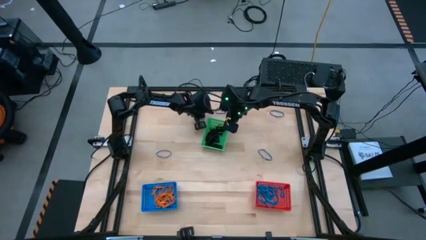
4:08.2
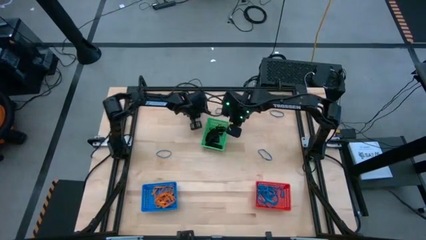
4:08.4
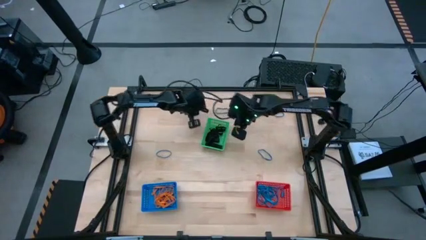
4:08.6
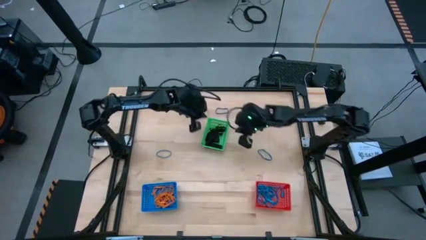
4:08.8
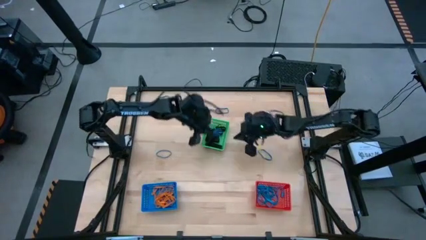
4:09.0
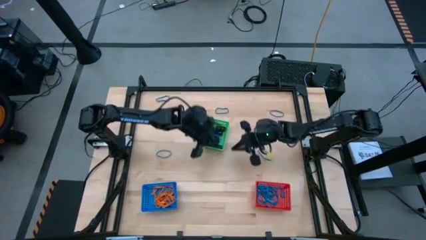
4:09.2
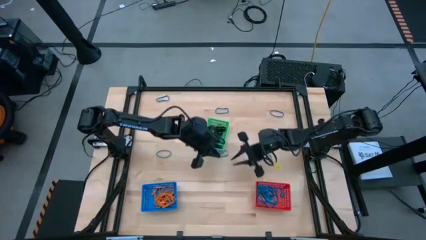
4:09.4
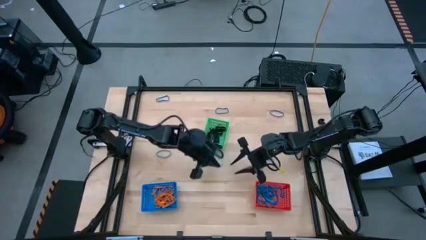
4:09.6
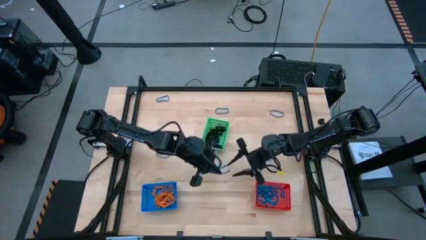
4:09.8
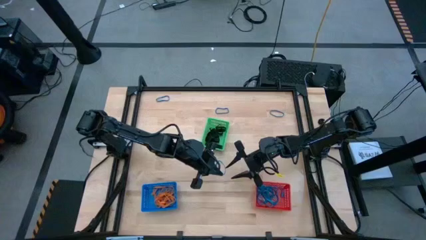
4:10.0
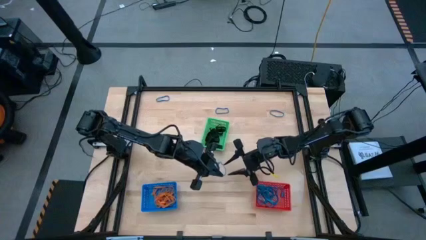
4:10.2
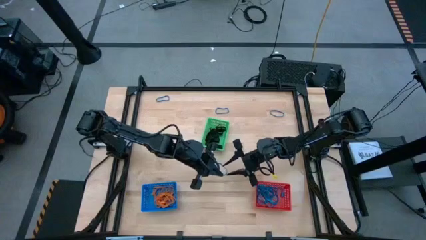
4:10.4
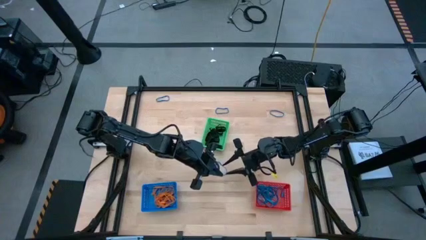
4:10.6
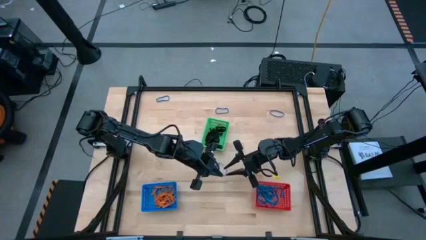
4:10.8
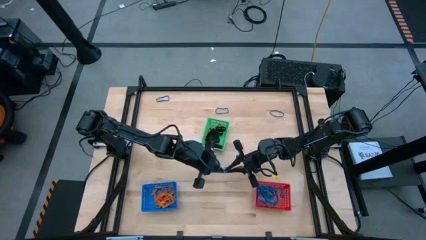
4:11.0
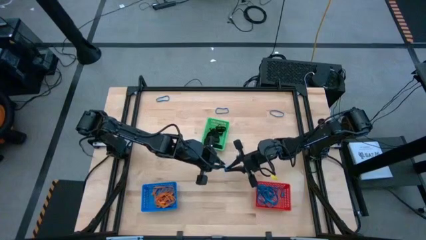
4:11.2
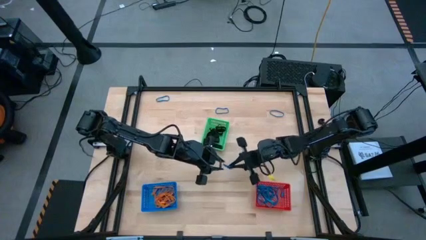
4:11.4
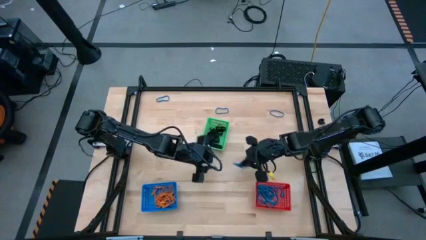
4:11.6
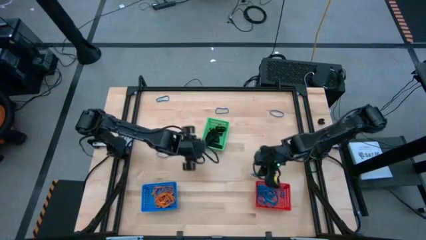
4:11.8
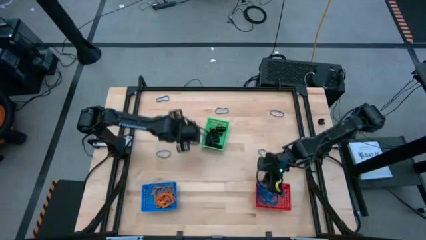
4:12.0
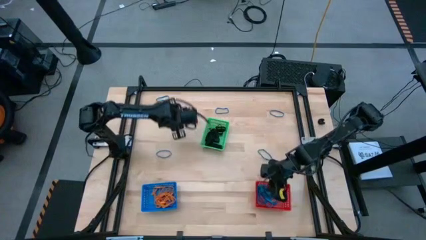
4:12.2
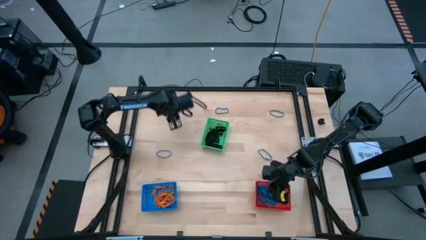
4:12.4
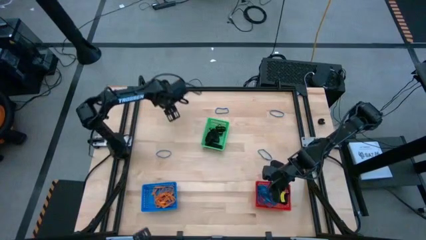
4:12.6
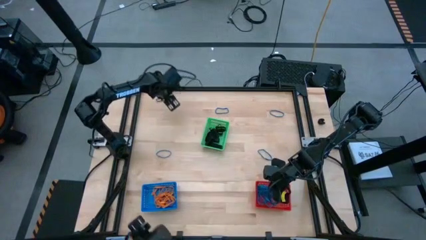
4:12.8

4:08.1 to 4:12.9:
Task: Sort rubber bands into baskets
Put the blue rubber band into the red bin

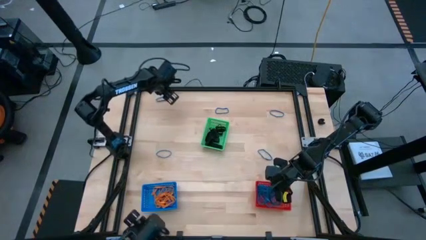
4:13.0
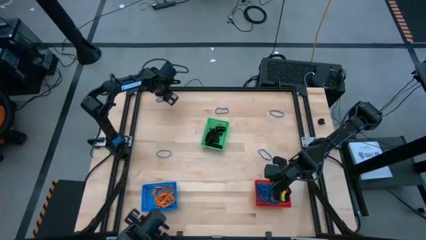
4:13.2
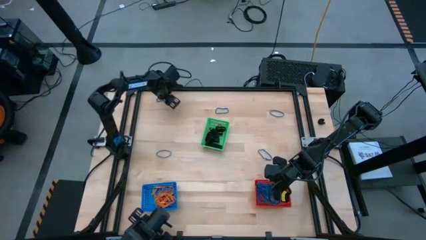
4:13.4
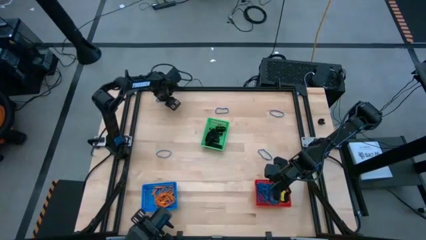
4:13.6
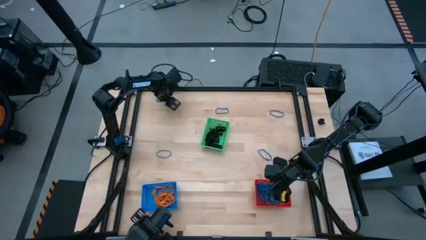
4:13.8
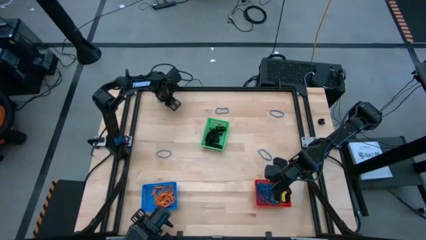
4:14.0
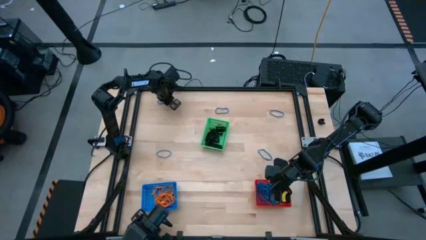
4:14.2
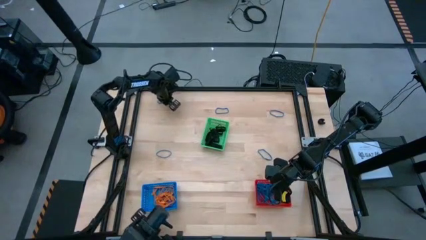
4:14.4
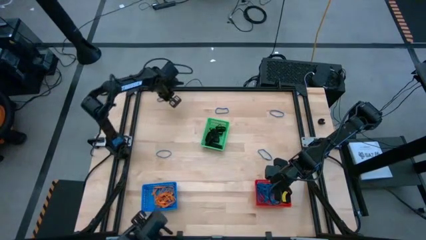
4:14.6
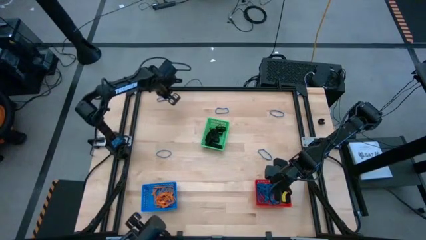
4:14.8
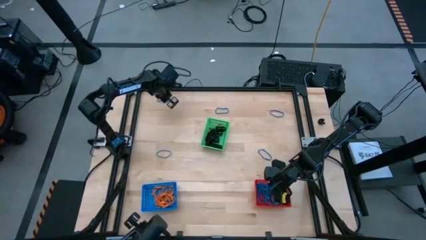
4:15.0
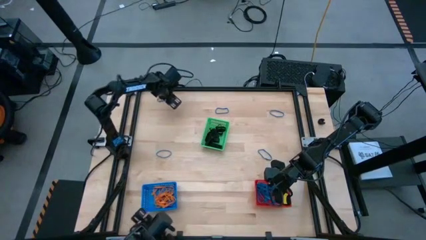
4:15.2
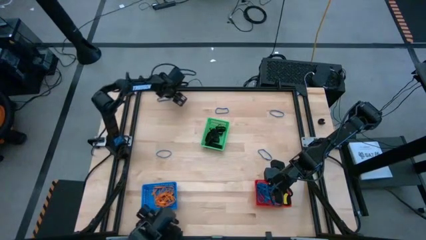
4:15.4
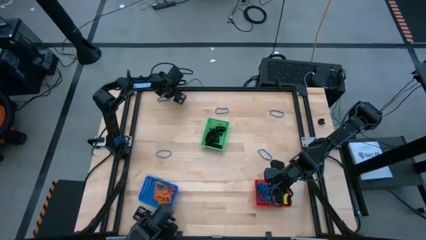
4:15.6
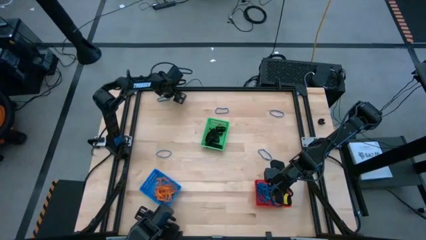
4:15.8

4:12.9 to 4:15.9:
Put the blue rubber band into the red bin

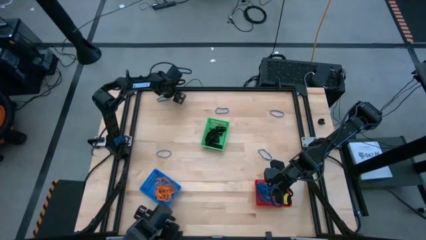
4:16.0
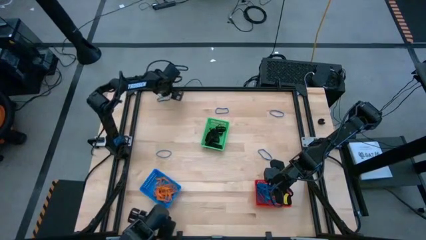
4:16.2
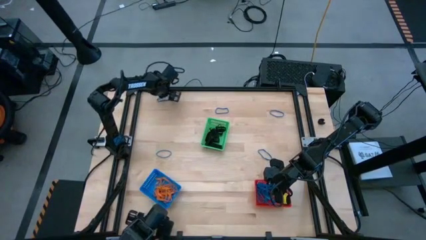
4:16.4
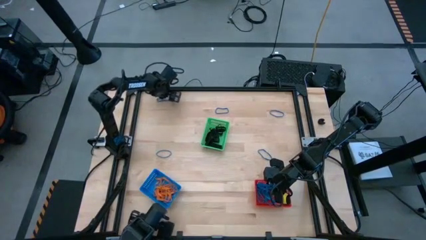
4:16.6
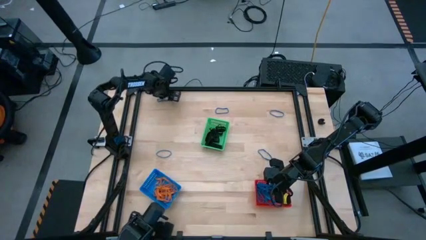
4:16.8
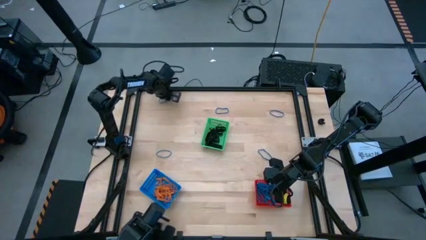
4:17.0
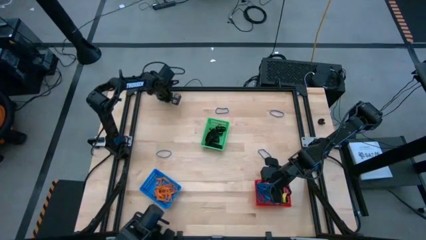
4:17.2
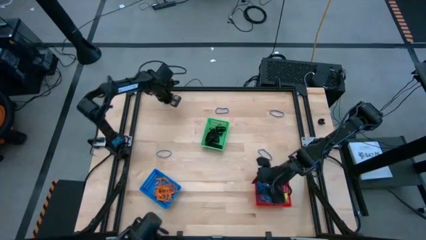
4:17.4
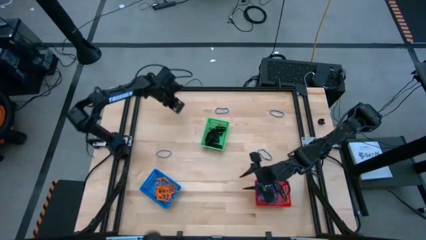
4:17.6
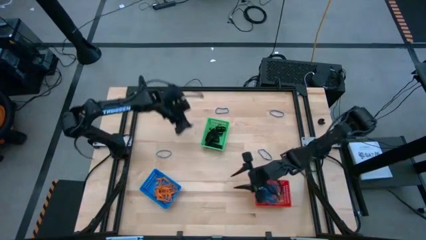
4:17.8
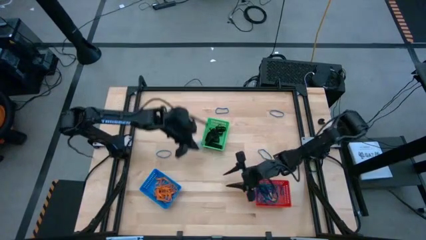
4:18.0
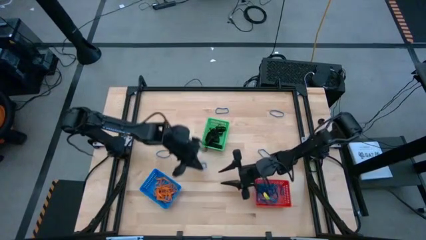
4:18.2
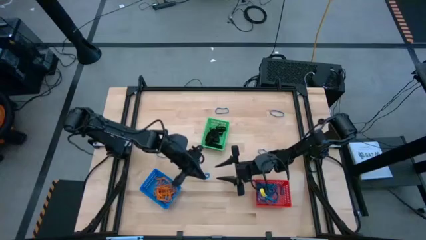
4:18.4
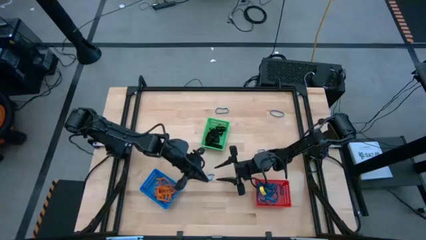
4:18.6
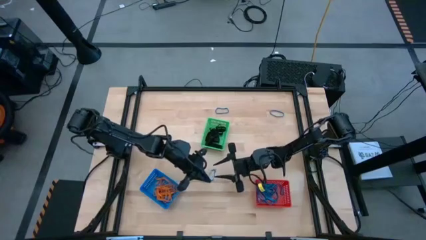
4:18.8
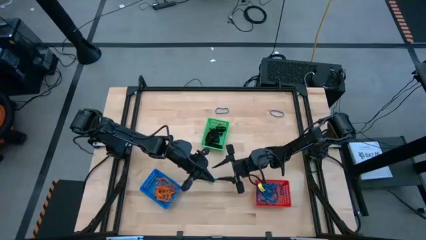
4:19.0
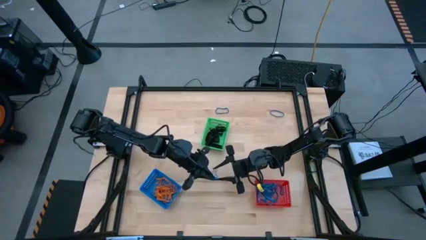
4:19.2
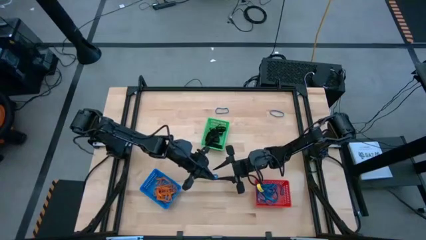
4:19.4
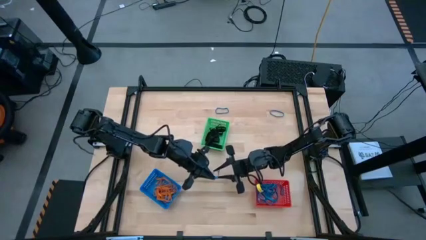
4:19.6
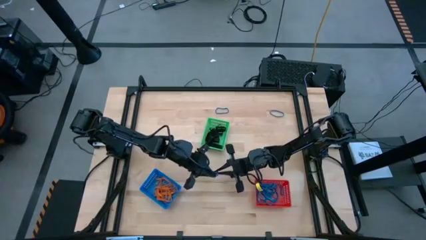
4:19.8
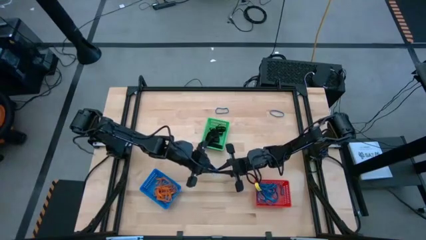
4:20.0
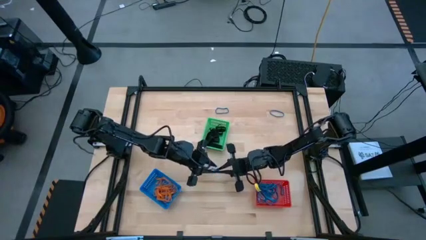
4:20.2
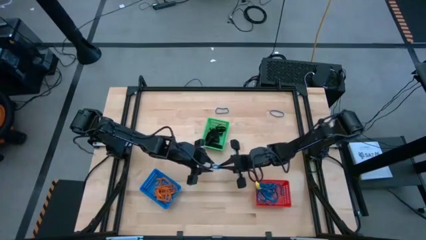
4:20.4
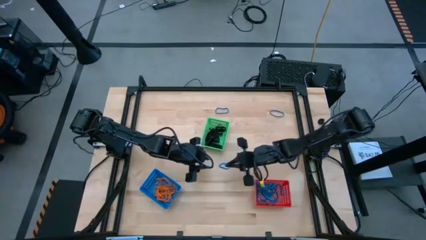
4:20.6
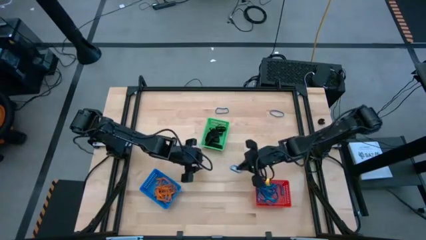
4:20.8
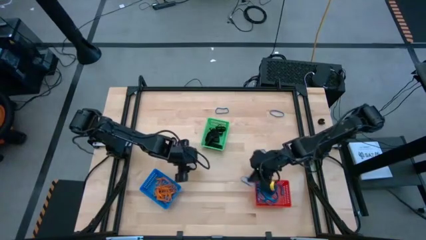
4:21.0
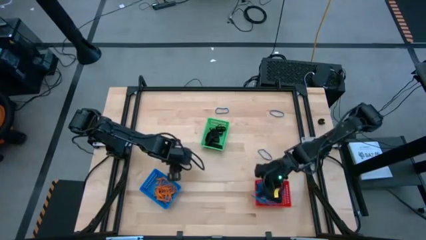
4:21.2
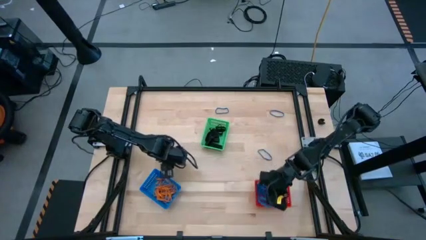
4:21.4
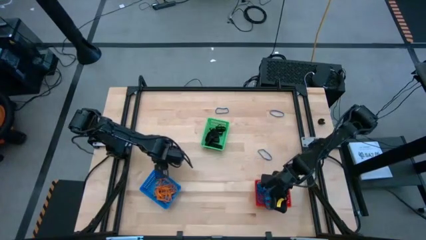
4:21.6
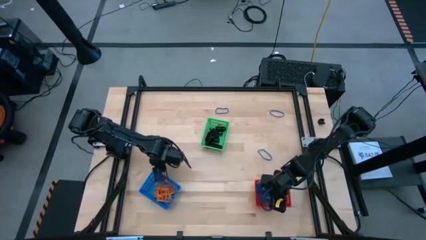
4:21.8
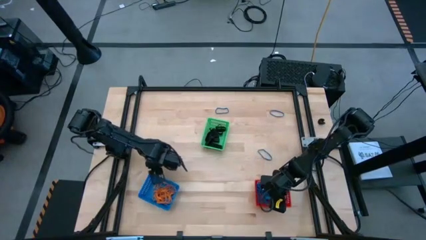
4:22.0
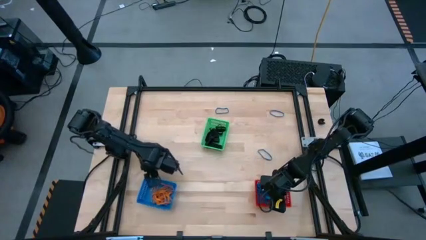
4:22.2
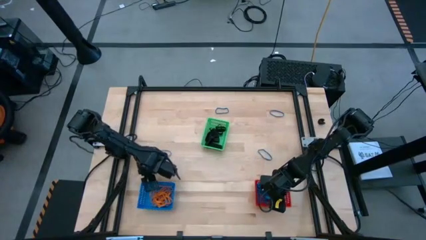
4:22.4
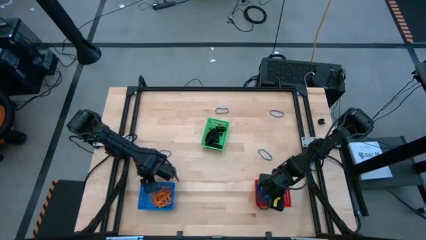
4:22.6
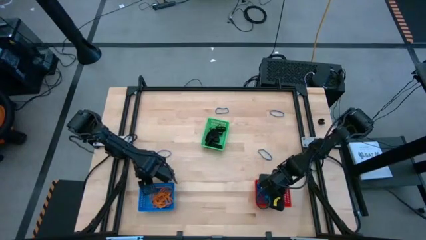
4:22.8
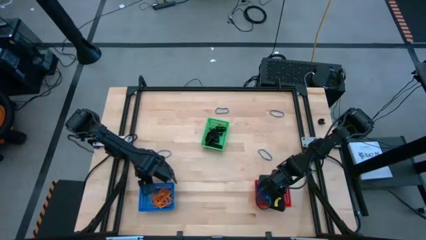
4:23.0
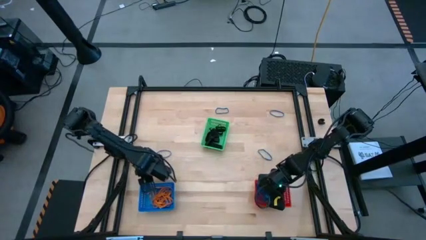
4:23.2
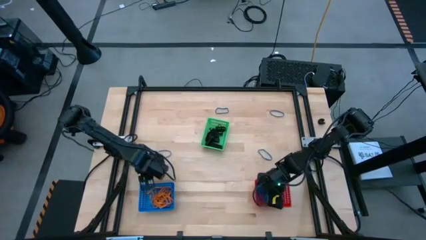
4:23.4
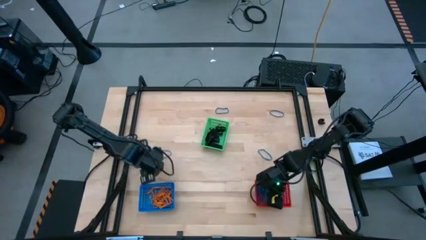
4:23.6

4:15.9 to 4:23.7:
Put the blue rubber band into the red bin
